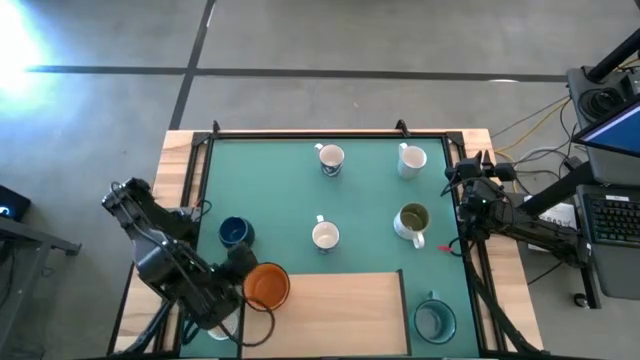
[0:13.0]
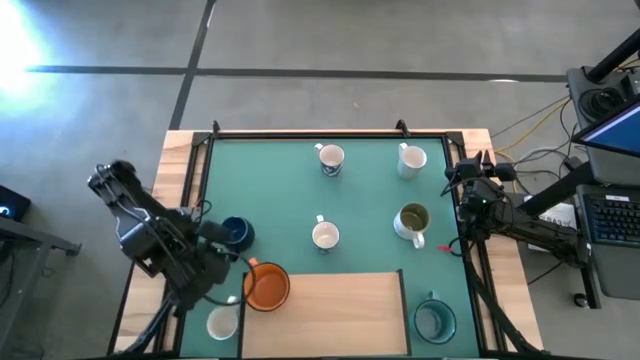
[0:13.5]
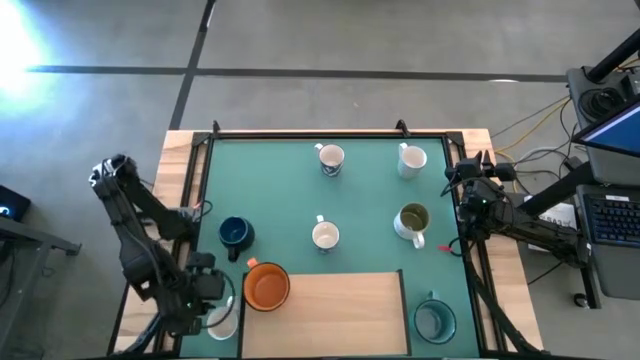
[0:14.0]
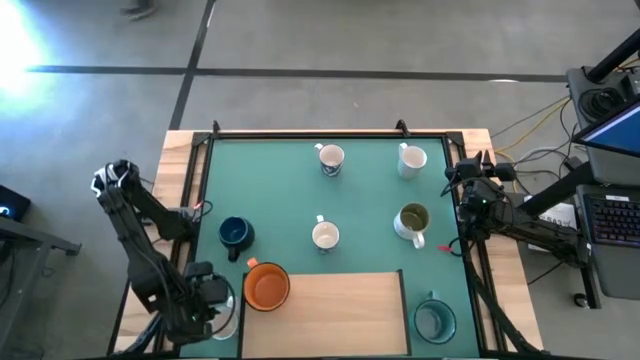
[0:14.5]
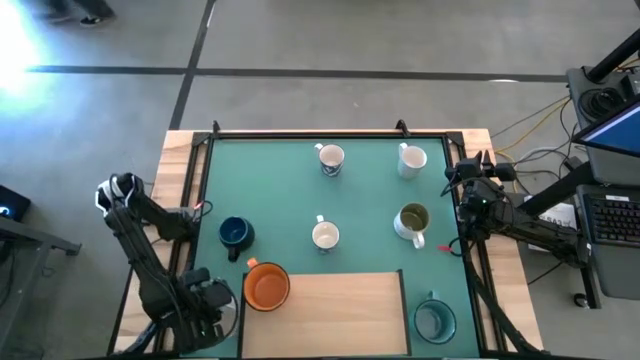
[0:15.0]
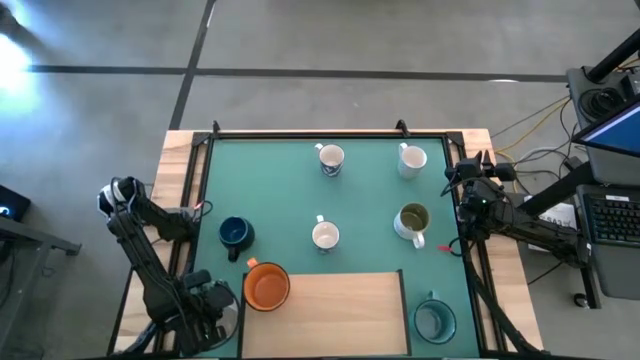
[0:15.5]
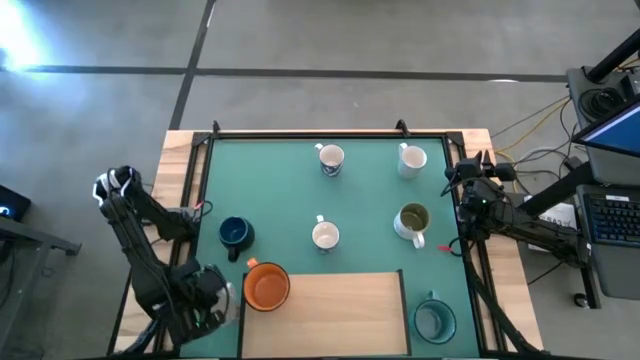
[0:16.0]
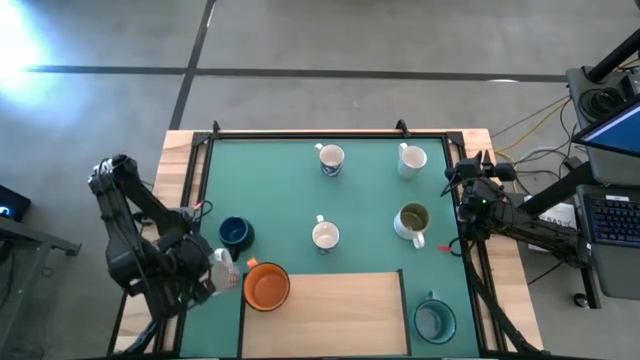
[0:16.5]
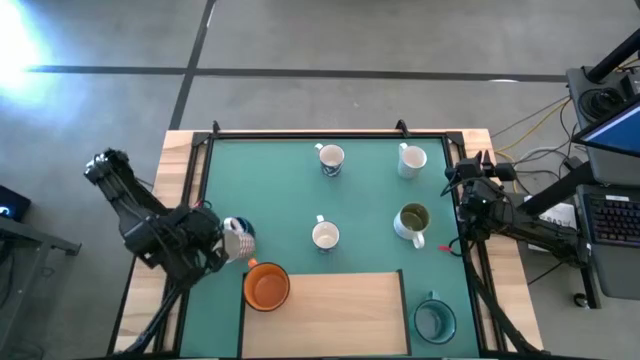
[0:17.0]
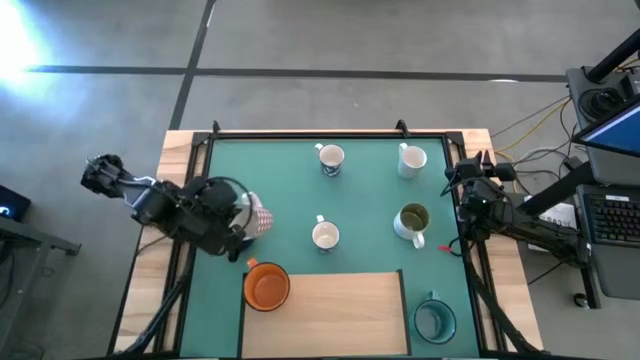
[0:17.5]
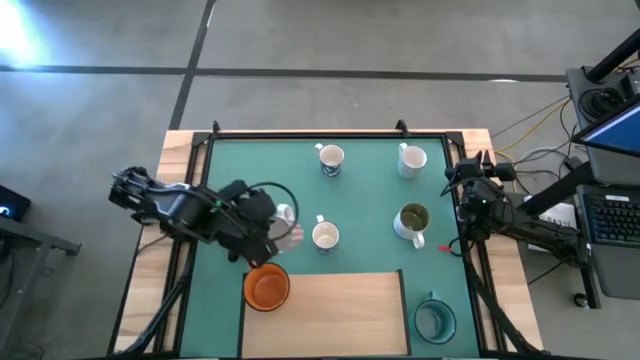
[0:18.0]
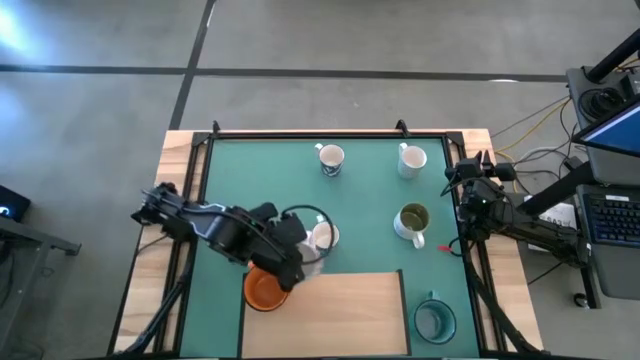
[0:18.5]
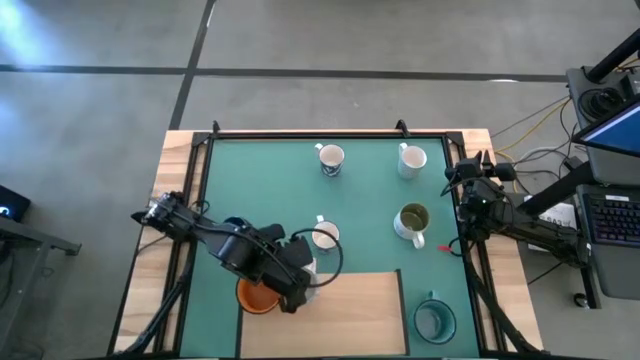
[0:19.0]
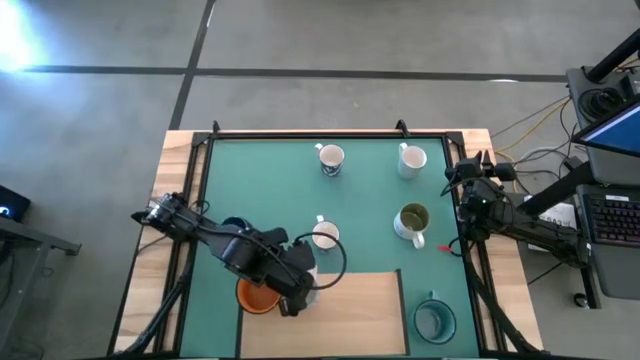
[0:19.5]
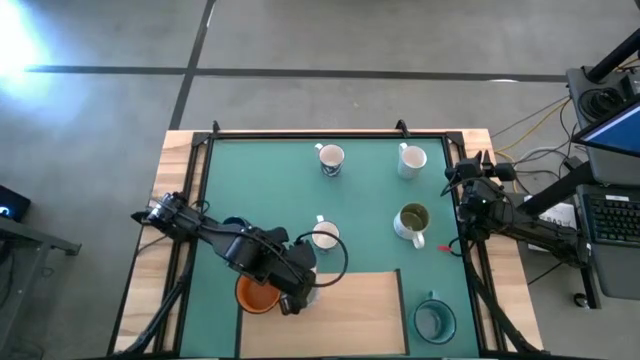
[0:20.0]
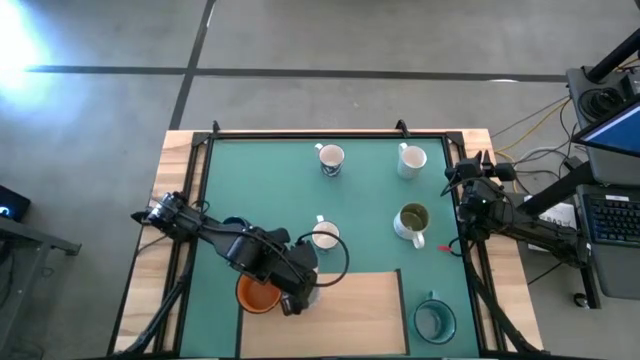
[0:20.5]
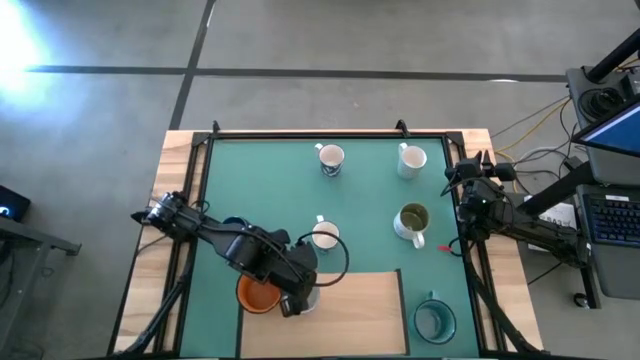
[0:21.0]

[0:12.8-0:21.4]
Task: Place coffee mugs
Put the red patterned mug on the shelf

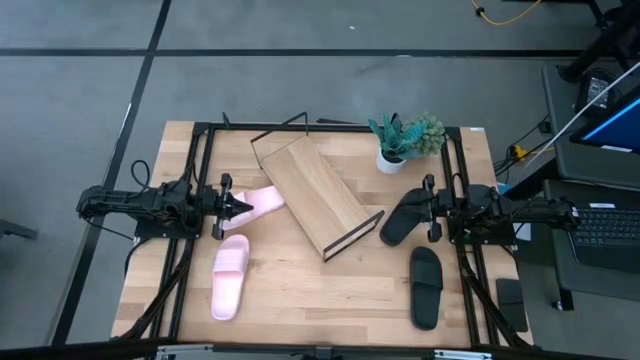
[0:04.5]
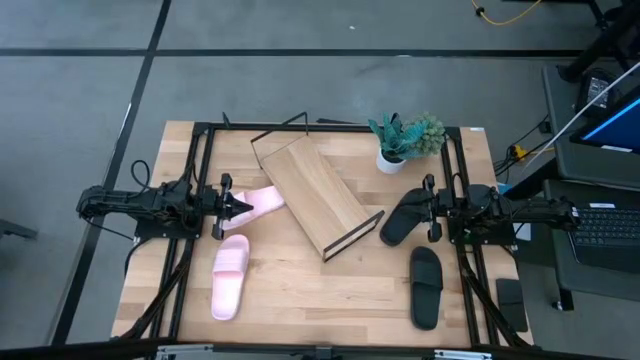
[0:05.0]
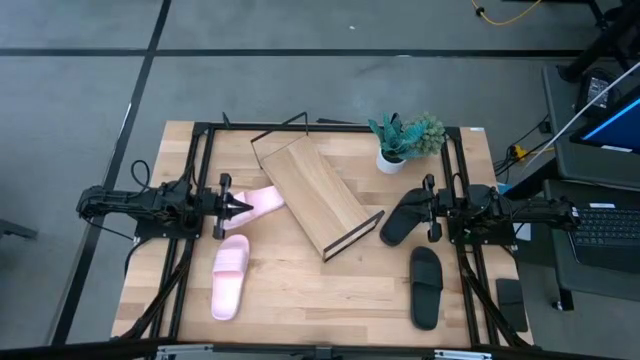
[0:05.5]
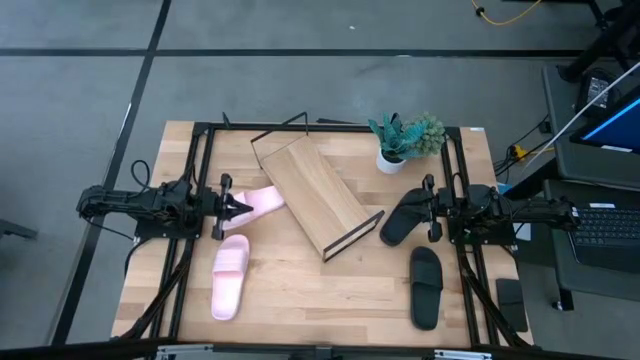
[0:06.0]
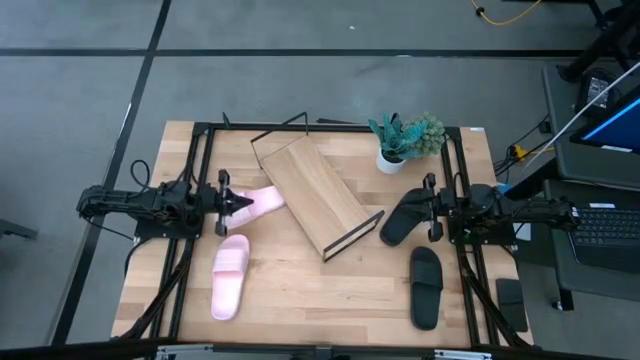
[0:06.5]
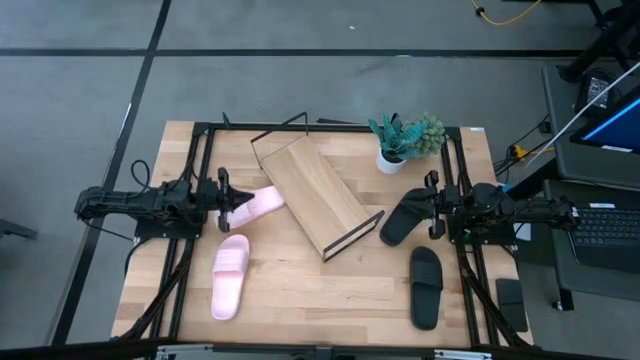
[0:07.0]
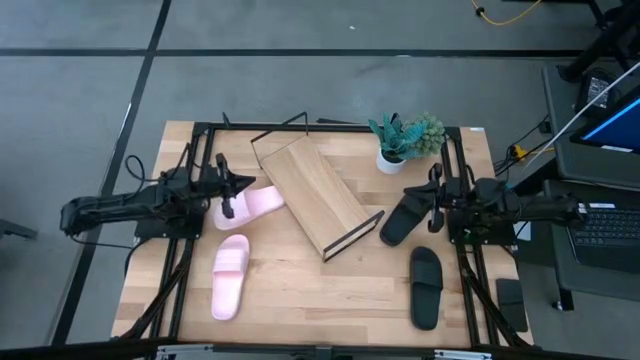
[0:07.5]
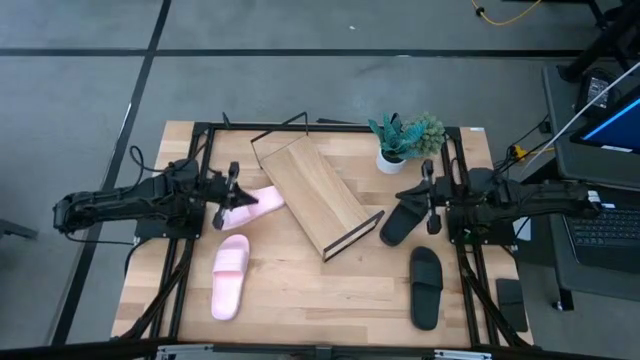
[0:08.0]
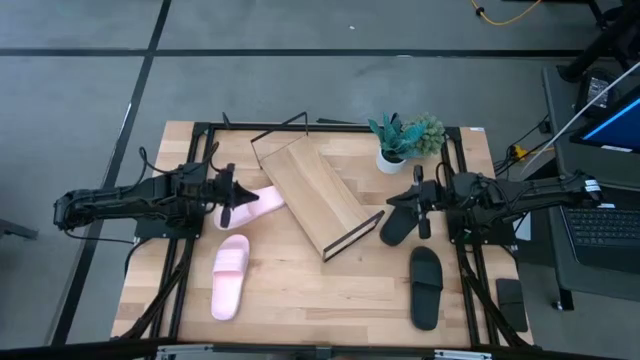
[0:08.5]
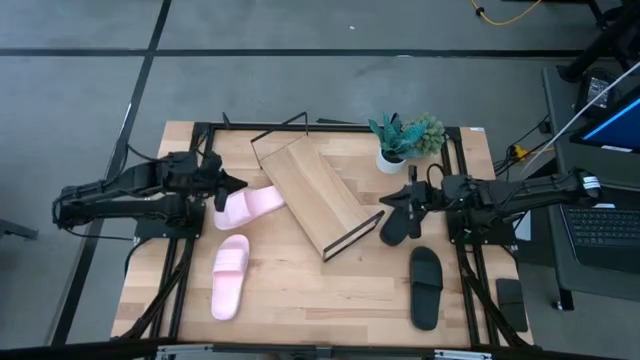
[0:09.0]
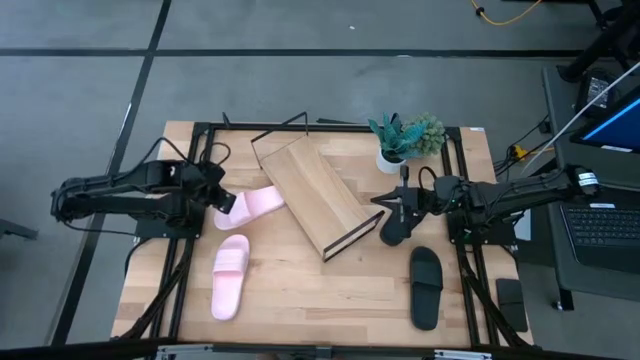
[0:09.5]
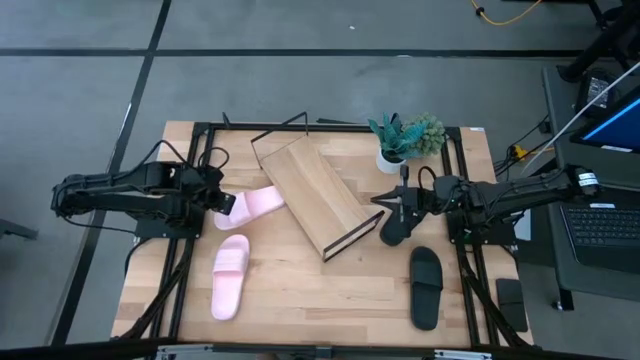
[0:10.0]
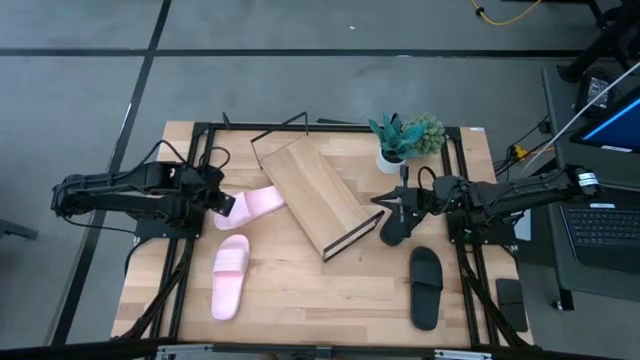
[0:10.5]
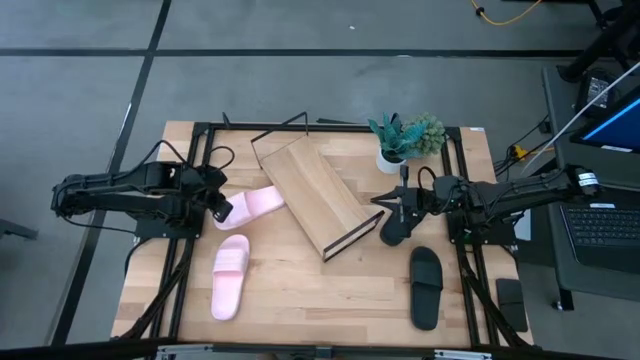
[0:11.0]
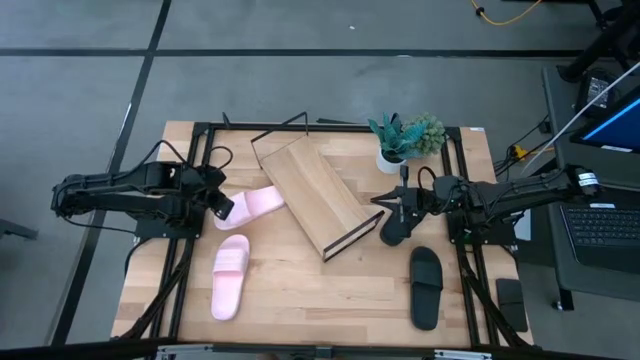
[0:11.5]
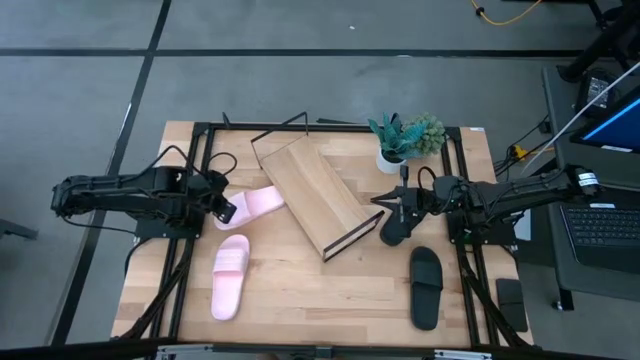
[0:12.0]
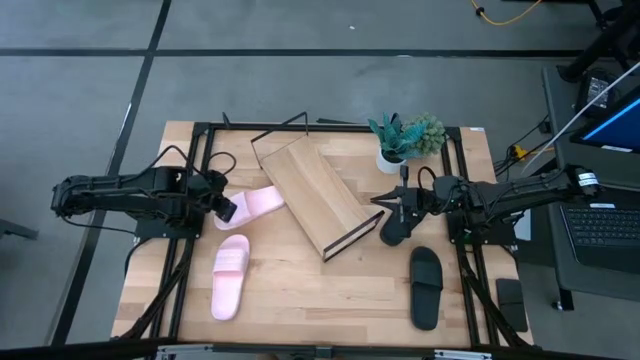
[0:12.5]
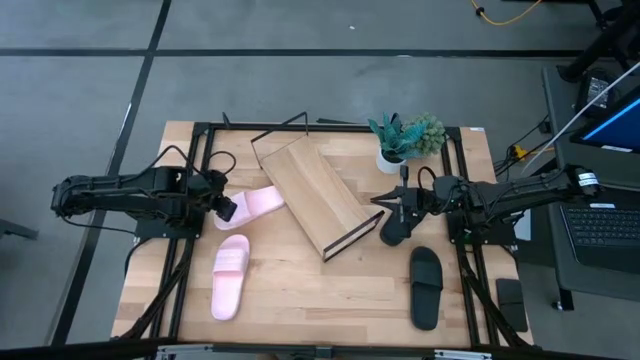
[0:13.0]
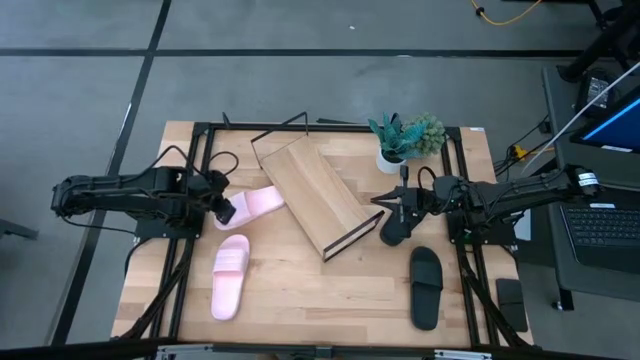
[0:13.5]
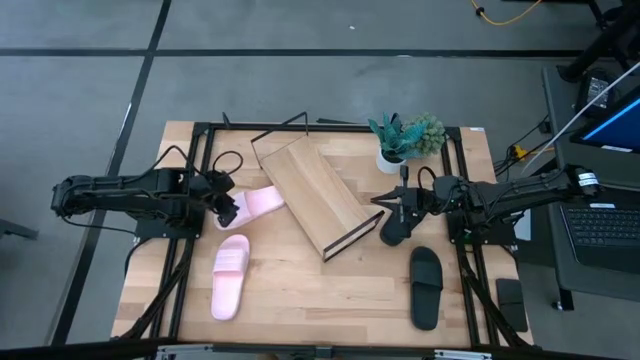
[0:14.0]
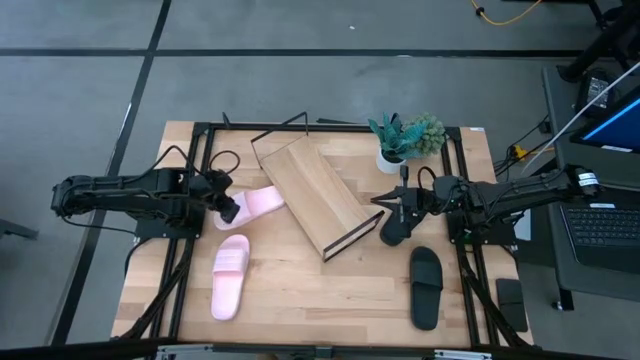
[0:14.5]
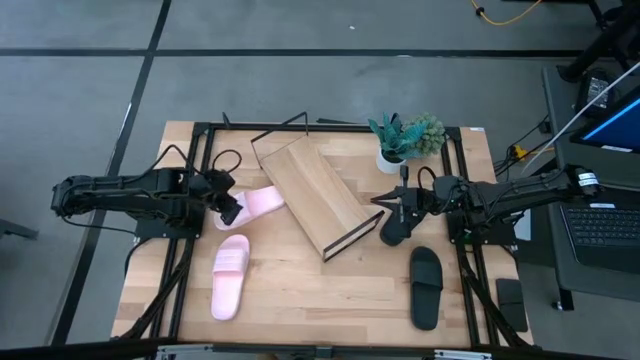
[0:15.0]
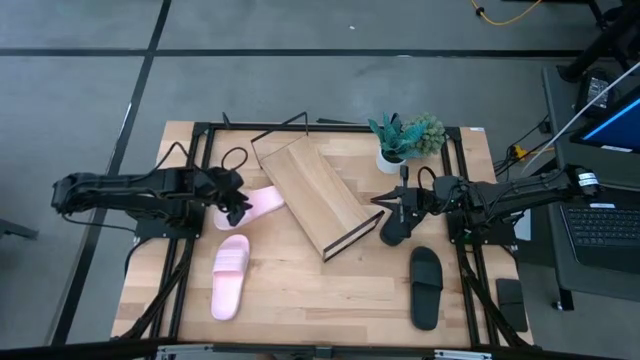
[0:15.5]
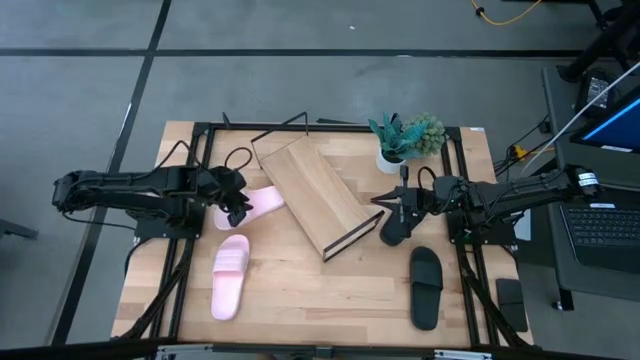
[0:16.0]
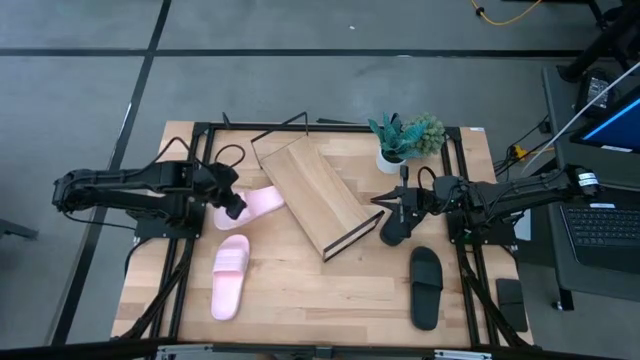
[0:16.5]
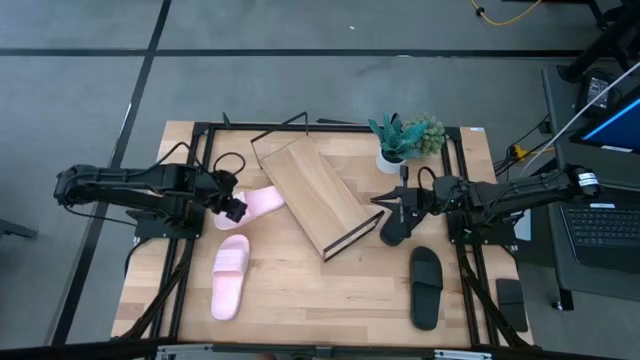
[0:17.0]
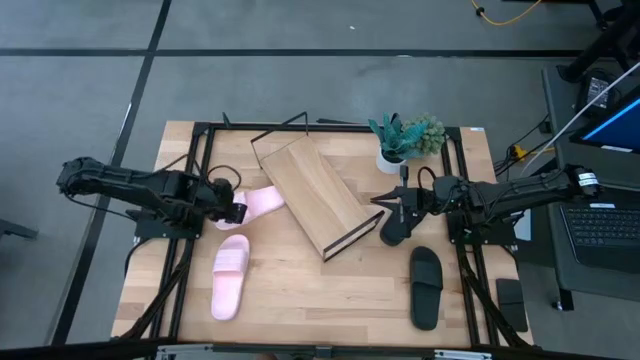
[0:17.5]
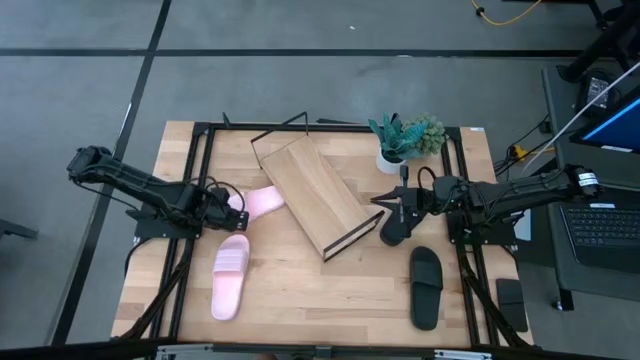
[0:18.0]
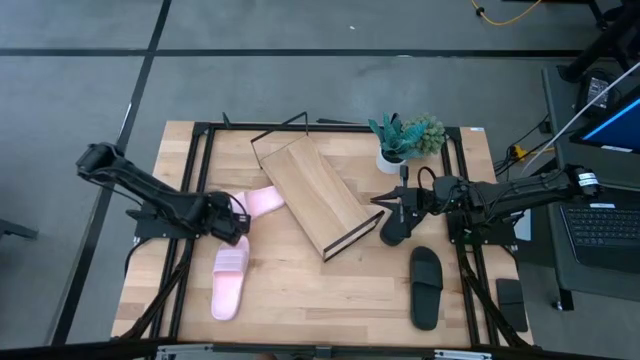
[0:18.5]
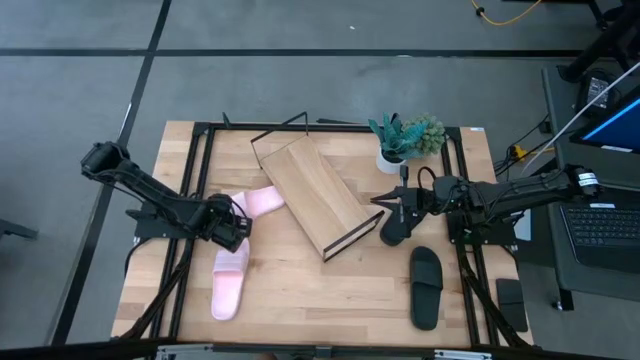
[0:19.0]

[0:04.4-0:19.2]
Task: Pick and place slides into the shelf
Put the top pink slide on the shelf
